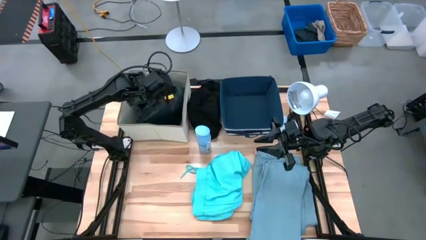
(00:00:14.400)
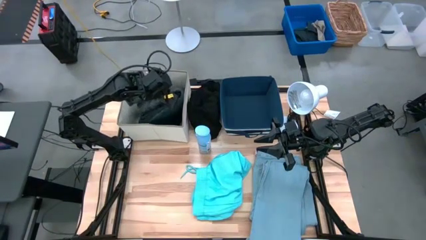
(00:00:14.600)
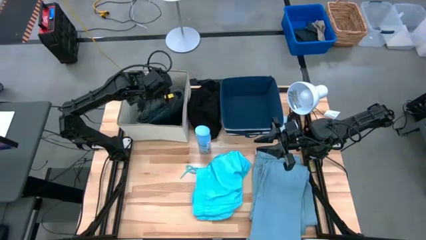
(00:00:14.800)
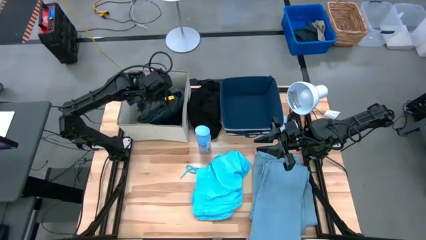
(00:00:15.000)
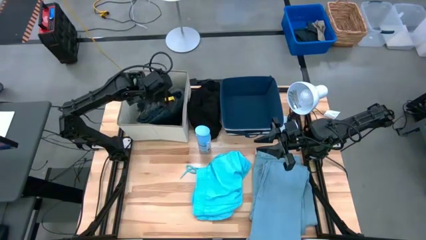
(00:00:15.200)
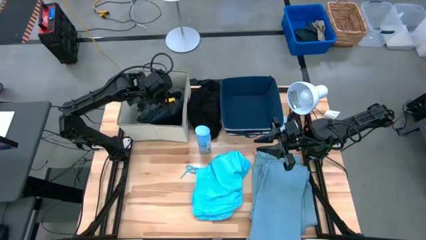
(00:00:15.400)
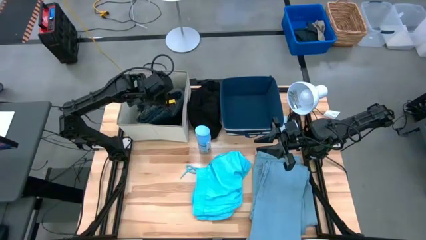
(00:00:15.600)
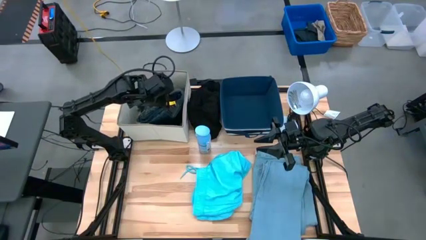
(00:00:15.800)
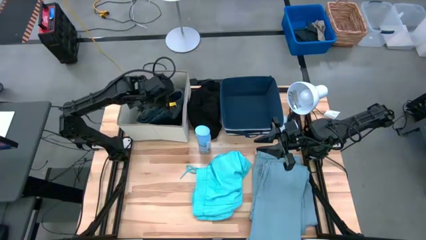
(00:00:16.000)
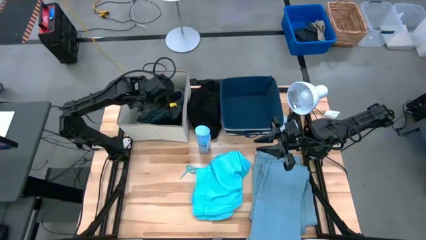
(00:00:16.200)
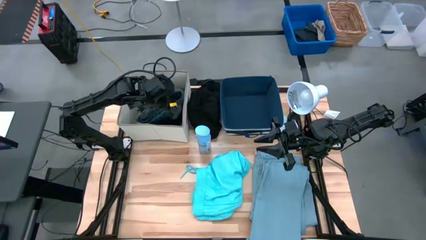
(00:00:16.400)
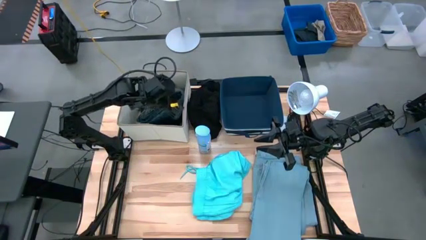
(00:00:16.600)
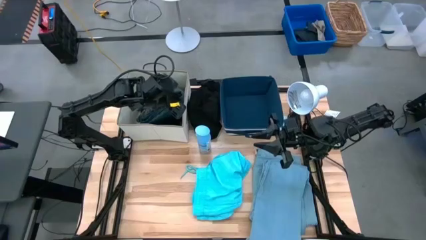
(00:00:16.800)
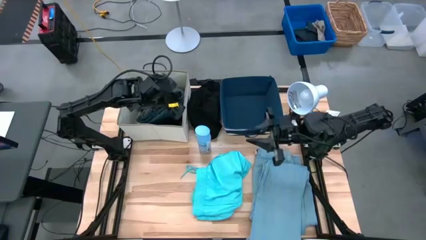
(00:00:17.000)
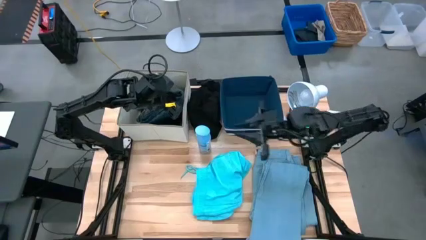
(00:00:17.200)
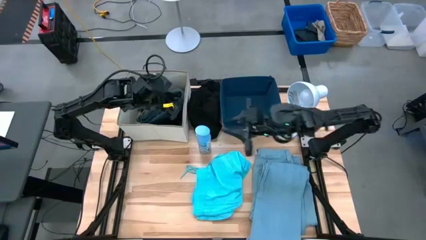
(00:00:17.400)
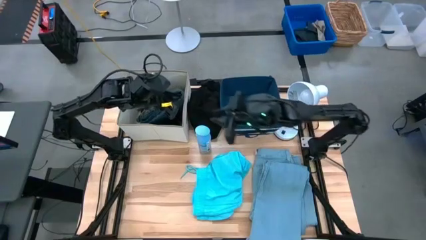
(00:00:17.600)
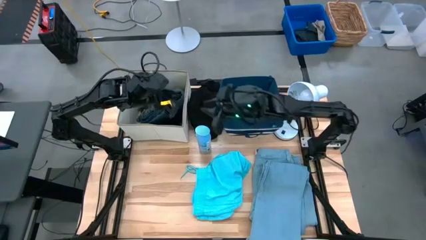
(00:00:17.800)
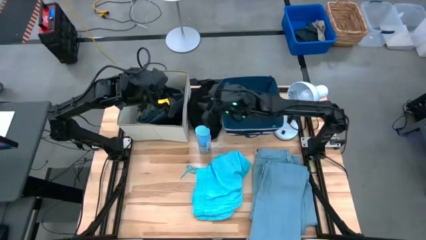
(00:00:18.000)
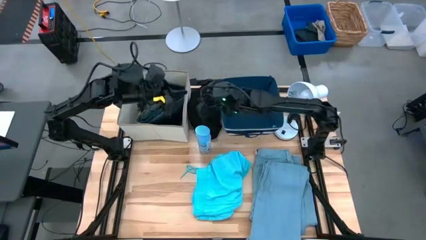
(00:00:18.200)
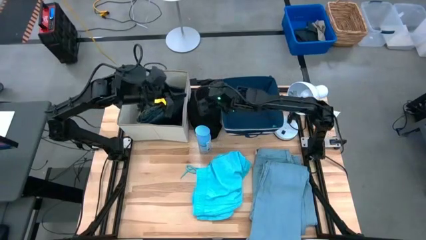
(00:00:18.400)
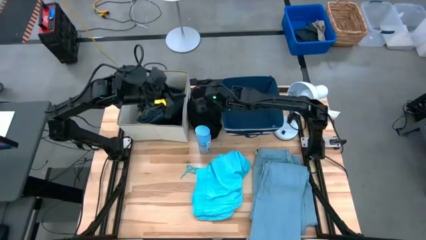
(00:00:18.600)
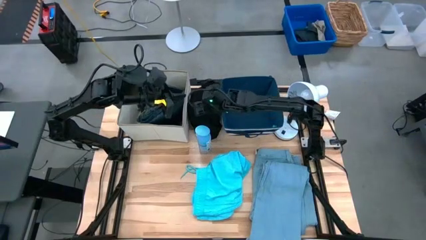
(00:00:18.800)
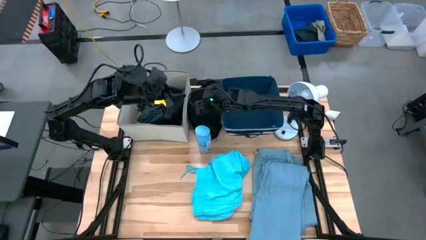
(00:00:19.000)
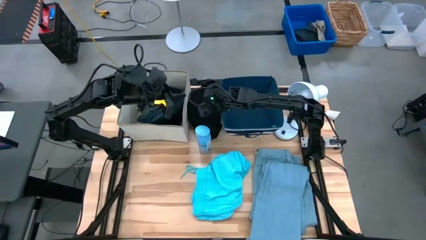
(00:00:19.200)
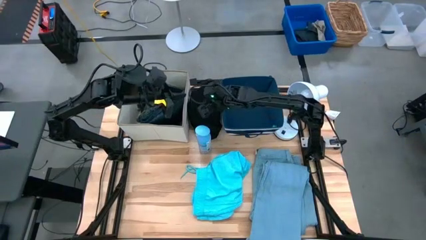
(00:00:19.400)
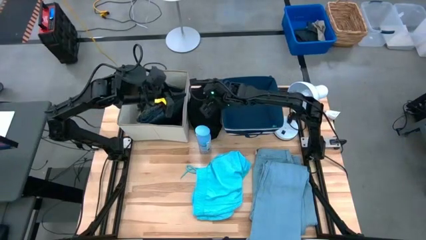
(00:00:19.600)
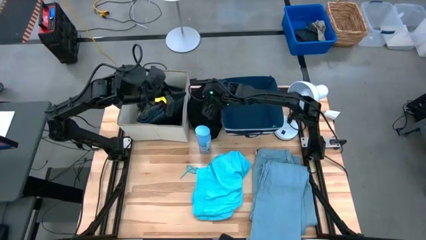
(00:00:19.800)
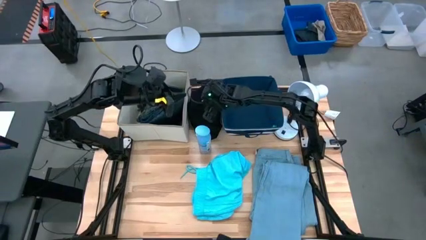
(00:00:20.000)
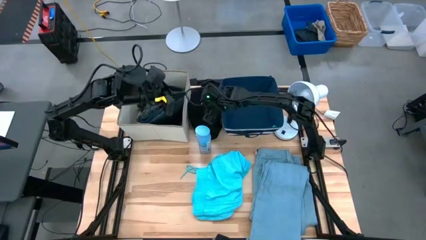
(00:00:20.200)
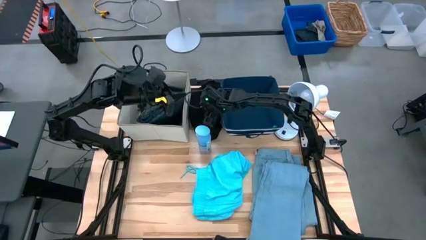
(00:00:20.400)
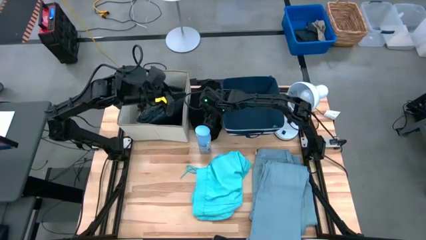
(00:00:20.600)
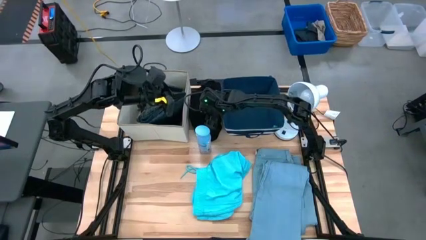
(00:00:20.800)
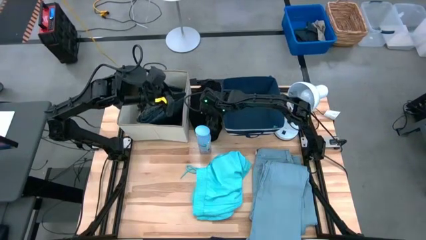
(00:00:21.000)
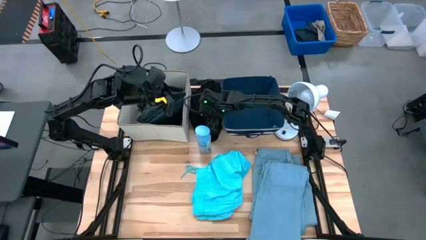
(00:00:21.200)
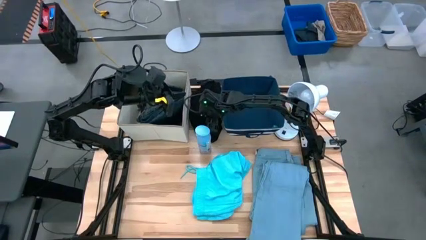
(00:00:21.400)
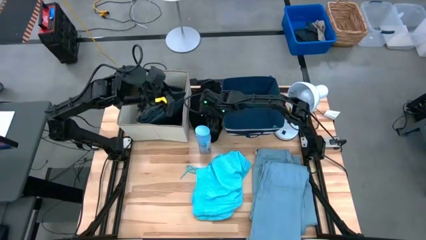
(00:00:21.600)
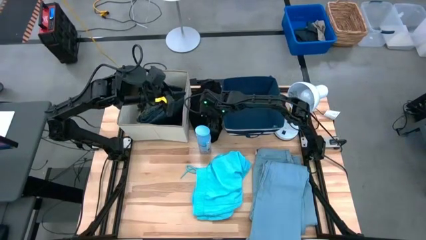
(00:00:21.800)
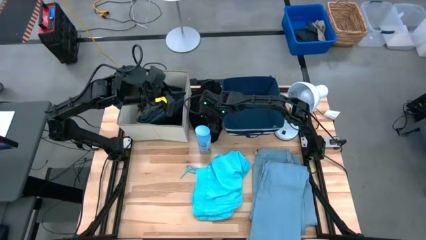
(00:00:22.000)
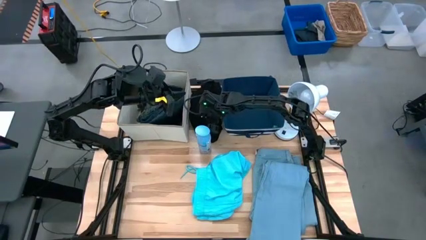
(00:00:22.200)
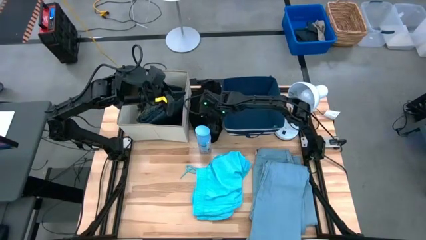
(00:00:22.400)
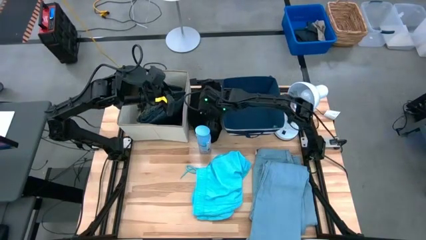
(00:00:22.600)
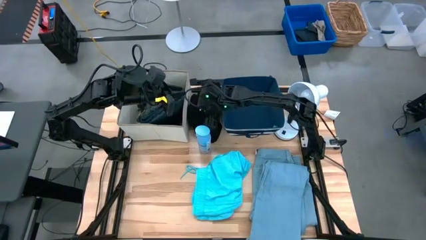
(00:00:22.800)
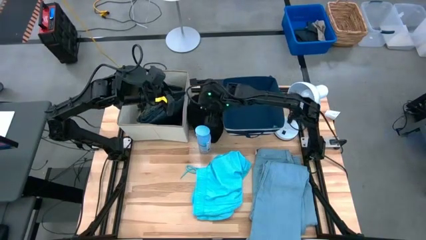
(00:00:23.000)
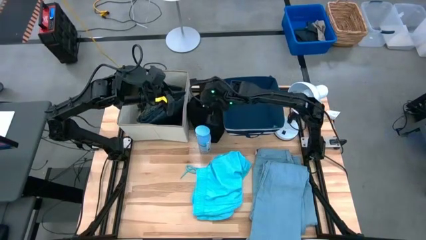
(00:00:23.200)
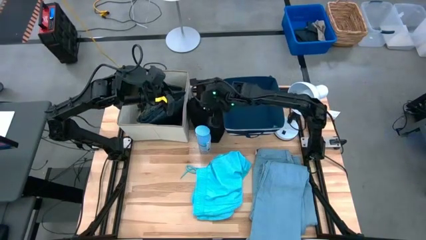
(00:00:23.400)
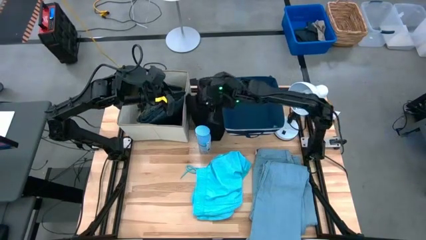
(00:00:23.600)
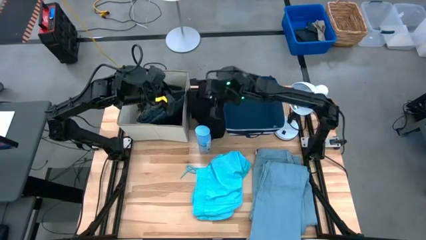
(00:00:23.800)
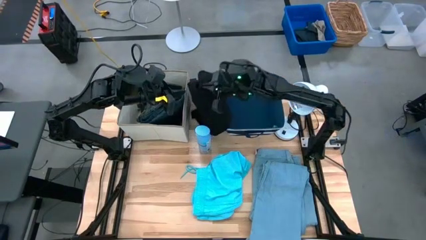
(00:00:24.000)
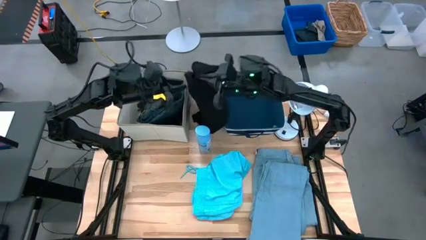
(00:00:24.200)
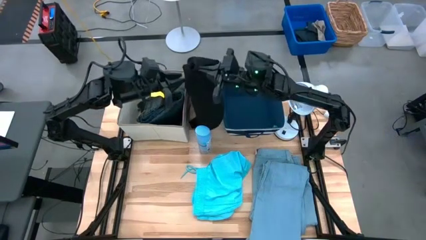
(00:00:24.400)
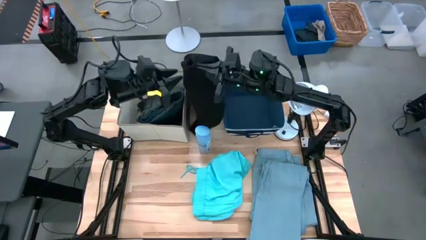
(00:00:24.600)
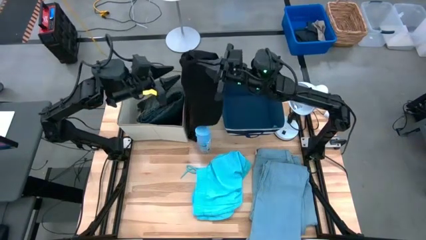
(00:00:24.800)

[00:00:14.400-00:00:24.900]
Task: Sort clothes
Put the black shirt into the laundry organizer
